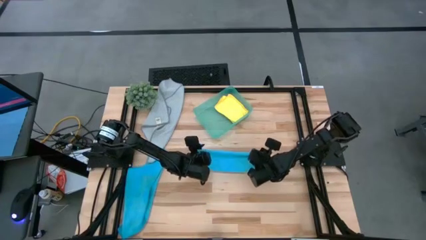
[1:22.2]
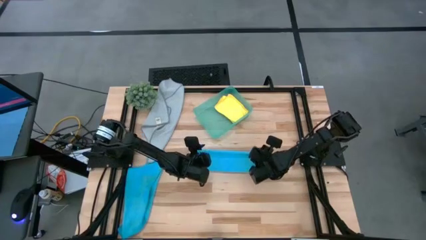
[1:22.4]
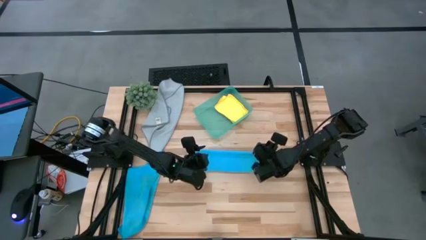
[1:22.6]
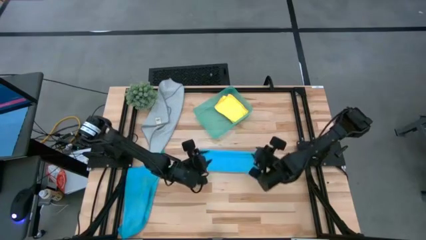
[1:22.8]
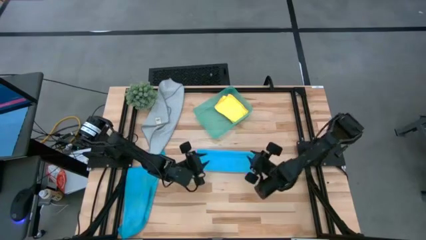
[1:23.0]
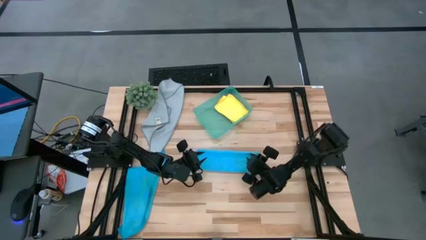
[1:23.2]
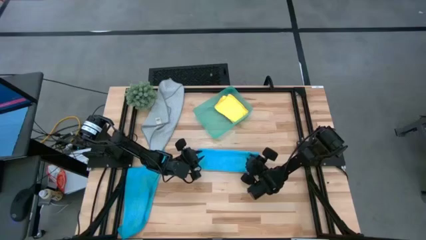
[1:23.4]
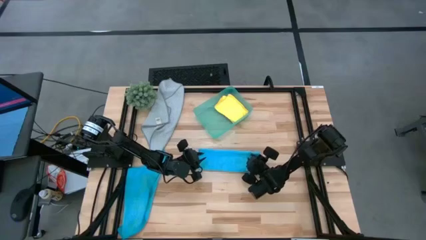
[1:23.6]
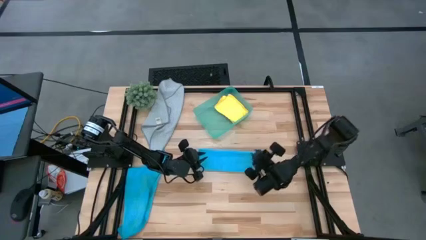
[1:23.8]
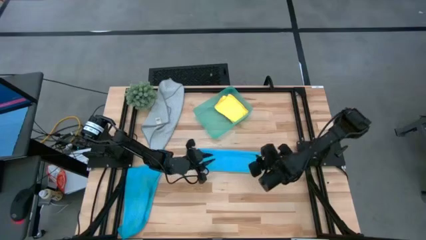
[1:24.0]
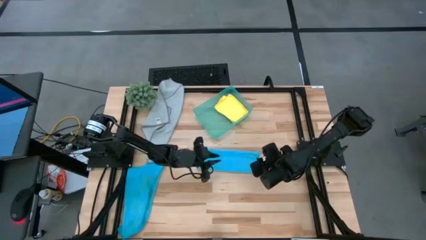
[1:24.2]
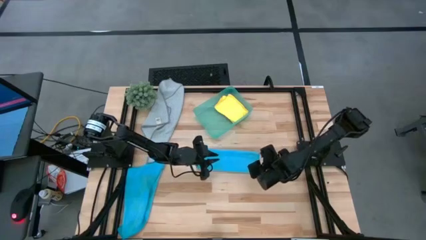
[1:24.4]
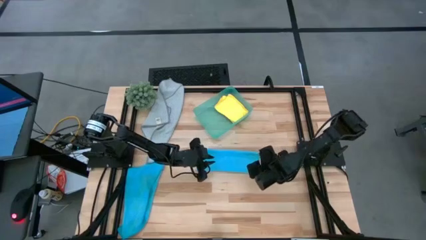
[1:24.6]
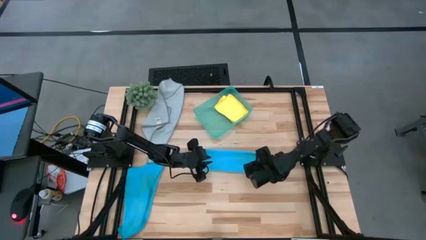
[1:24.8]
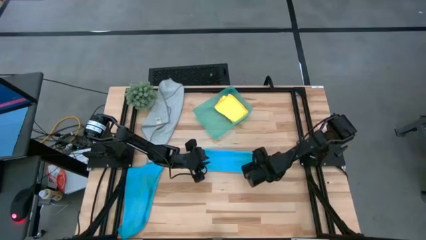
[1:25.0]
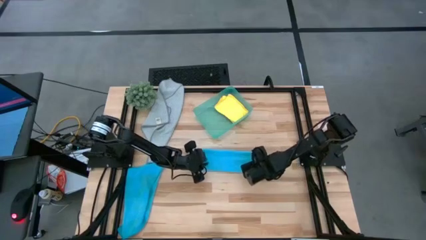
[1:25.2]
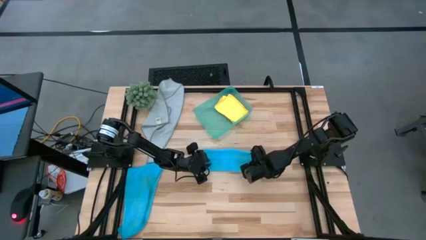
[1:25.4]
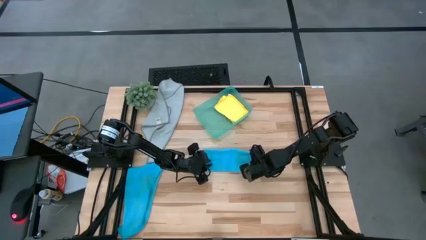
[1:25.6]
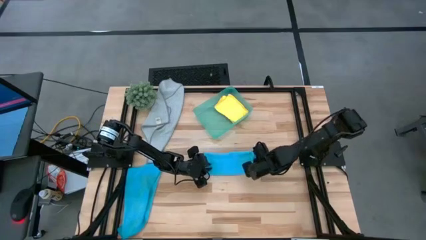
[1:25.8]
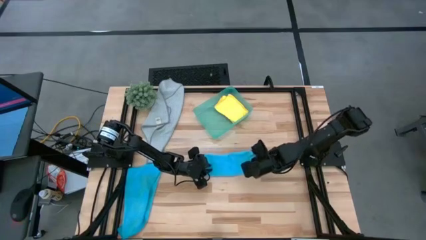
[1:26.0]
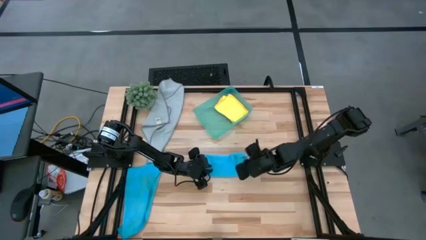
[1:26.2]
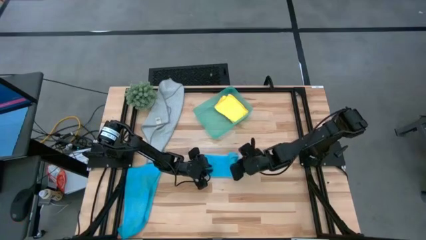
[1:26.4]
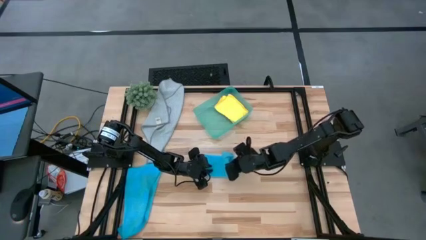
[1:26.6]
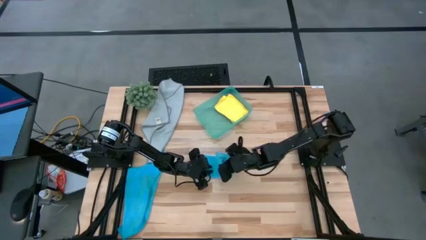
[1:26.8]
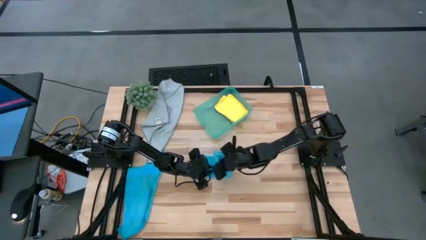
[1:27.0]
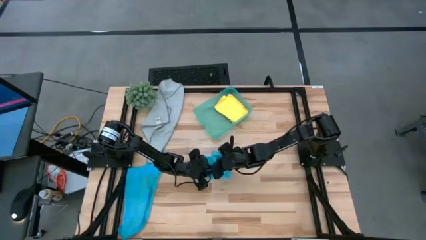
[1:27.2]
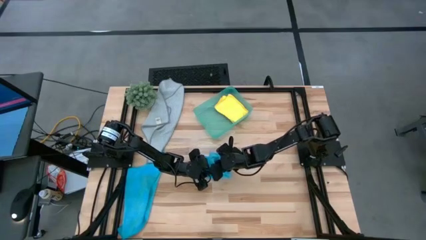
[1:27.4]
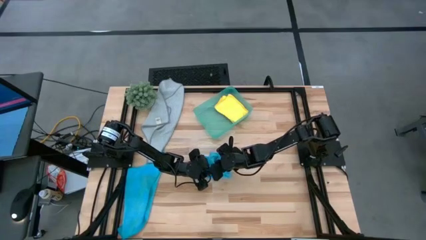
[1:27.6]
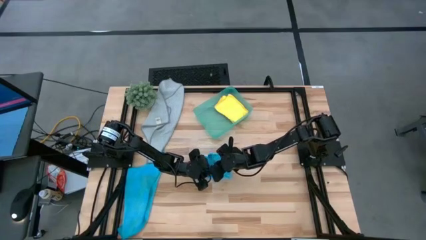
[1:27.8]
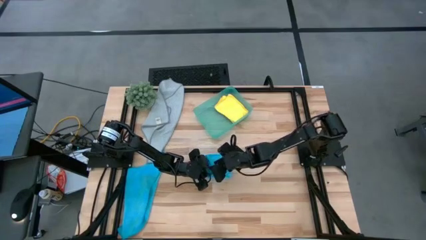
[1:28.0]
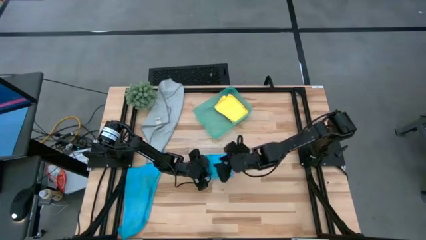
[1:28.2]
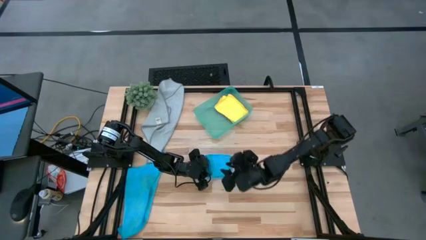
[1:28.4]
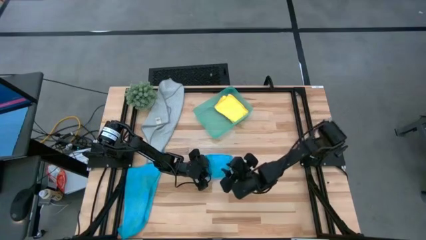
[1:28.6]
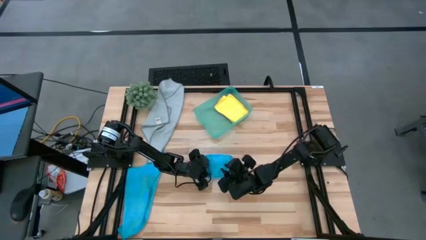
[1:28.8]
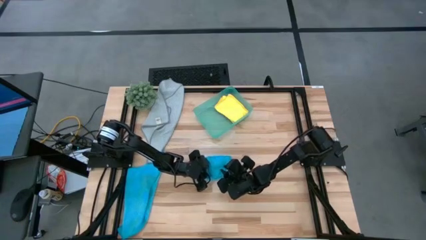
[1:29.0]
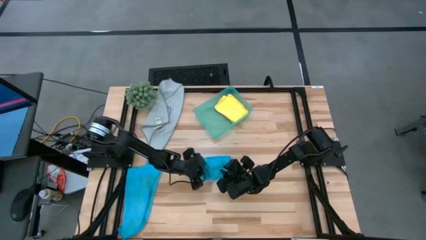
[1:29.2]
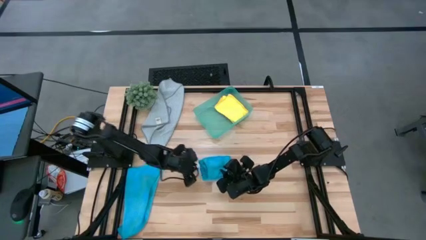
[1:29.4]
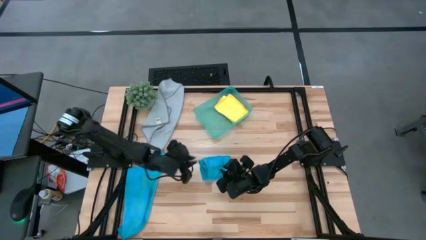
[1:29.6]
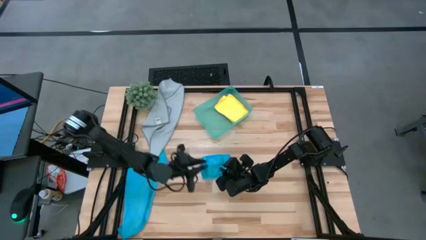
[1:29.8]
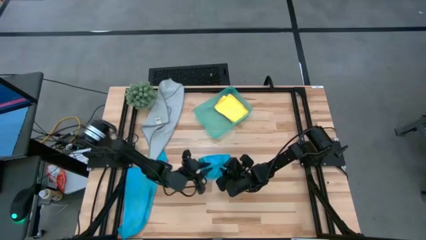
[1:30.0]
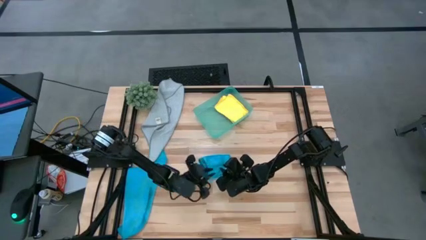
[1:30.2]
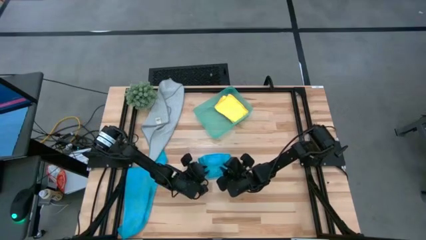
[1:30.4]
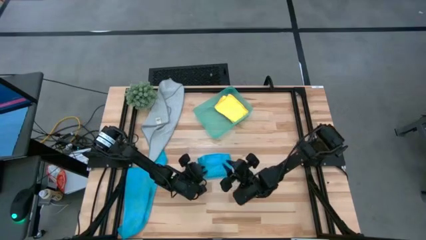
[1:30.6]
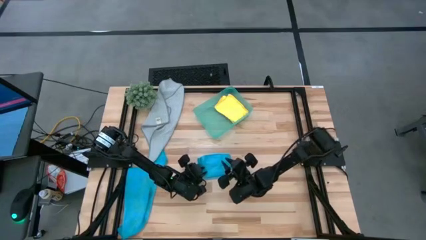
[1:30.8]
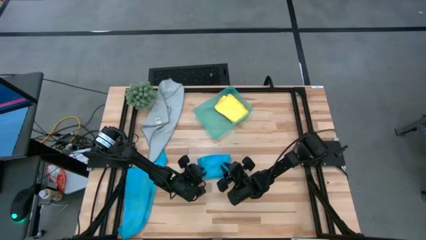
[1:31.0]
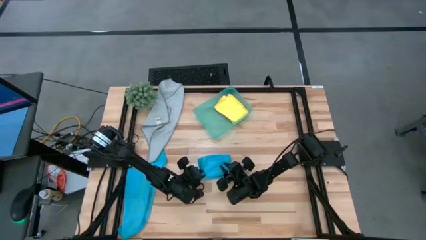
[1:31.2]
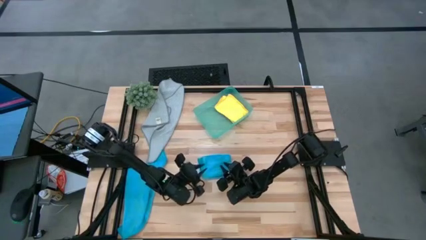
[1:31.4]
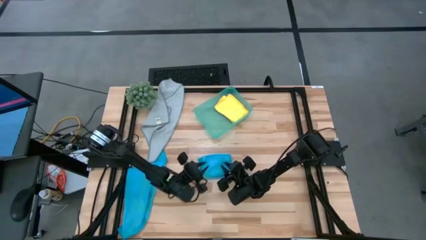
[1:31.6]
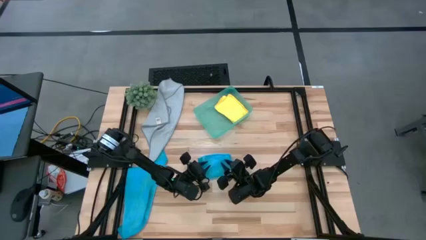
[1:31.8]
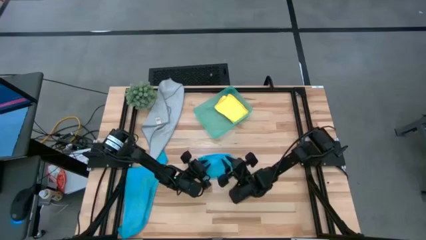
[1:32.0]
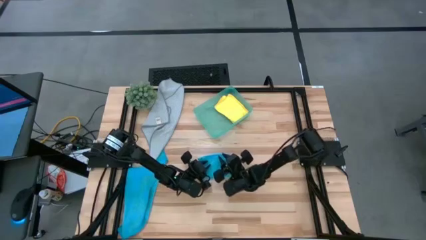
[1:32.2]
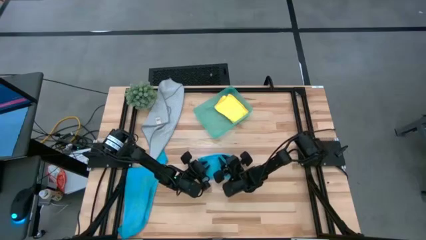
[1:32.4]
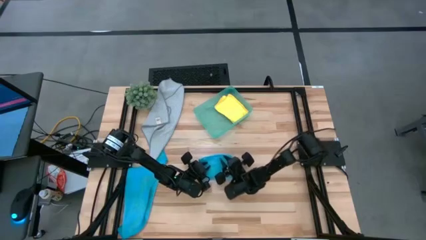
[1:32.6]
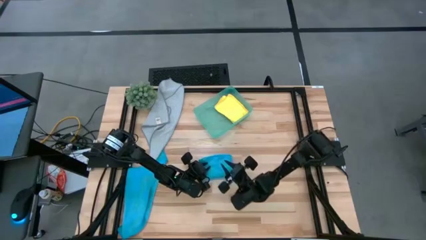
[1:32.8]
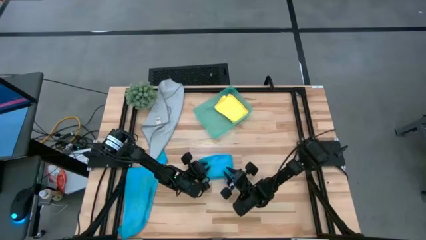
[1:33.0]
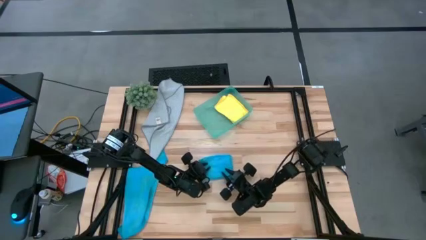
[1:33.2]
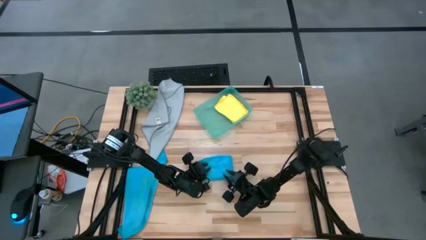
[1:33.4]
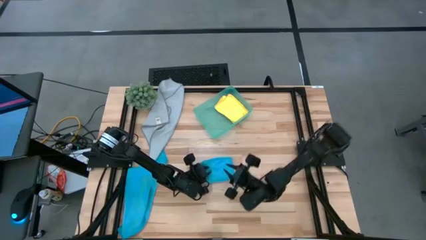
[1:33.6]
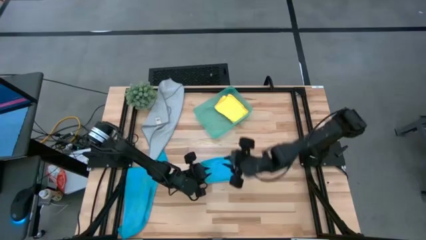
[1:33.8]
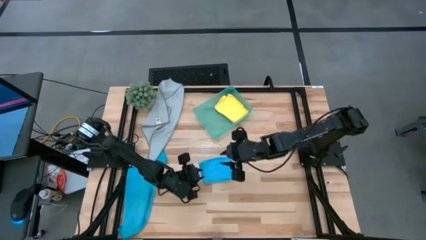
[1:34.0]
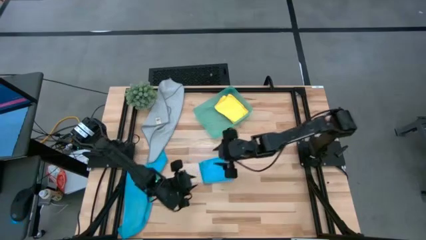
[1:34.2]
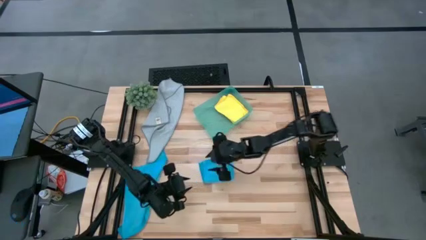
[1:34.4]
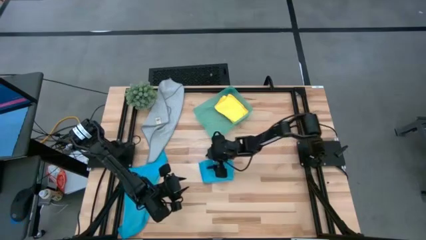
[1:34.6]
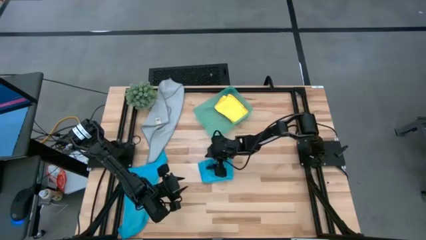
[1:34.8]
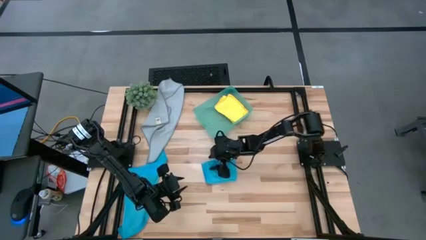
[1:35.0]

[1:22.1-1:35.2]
Task: Fold microfiber towels
Fold the right blue microfiber towel

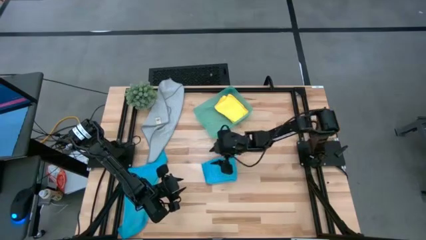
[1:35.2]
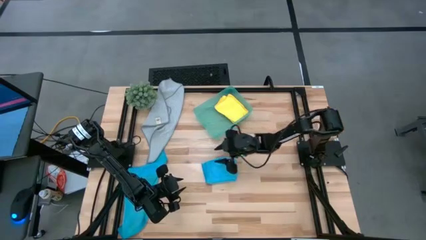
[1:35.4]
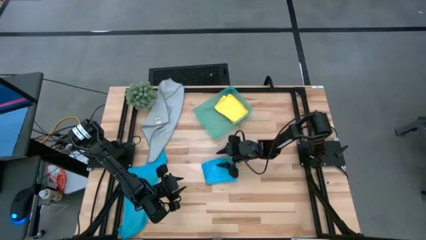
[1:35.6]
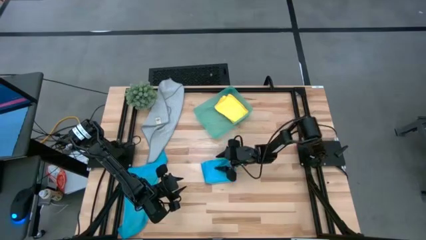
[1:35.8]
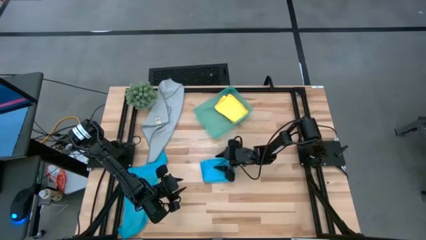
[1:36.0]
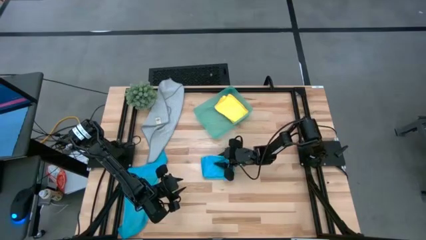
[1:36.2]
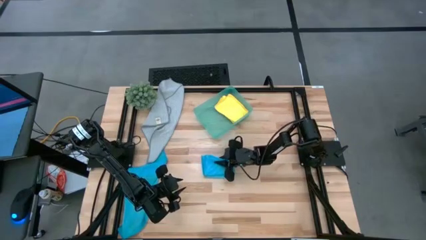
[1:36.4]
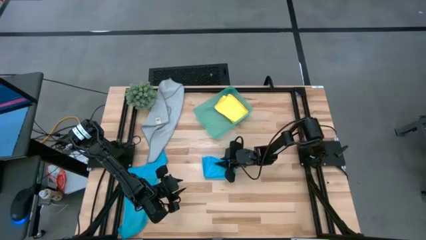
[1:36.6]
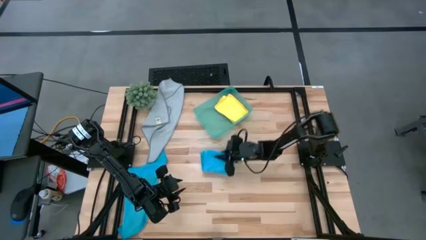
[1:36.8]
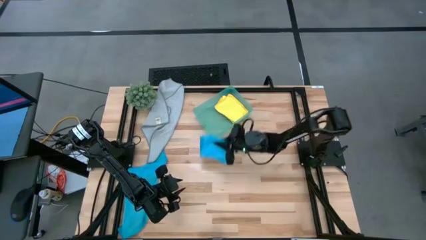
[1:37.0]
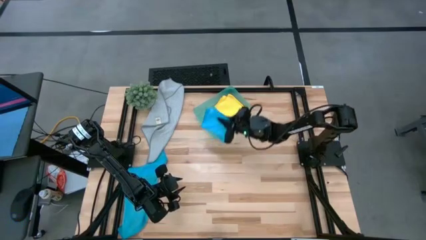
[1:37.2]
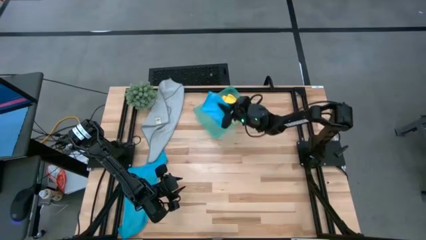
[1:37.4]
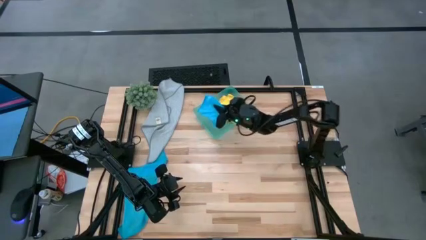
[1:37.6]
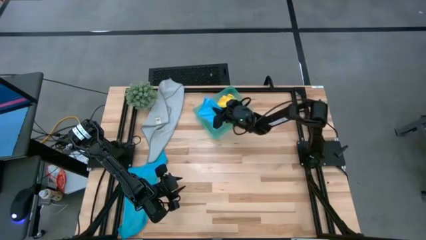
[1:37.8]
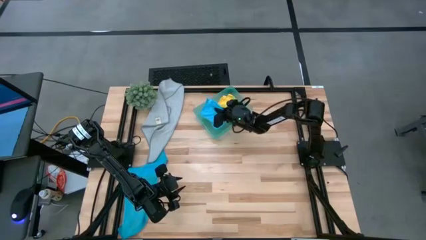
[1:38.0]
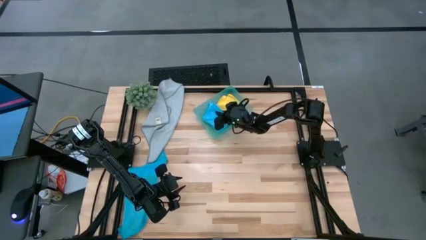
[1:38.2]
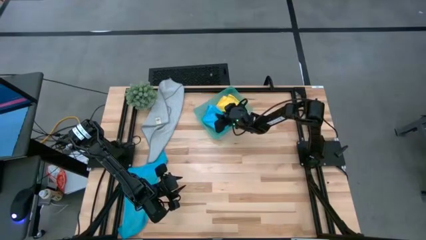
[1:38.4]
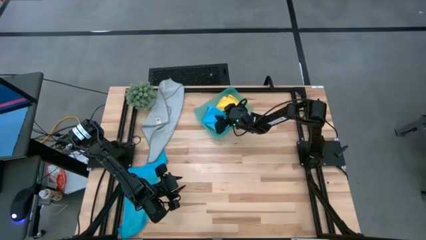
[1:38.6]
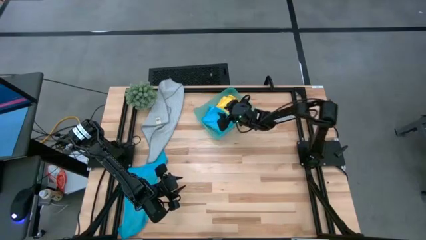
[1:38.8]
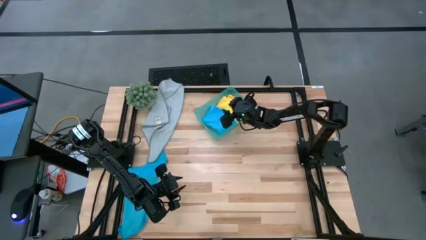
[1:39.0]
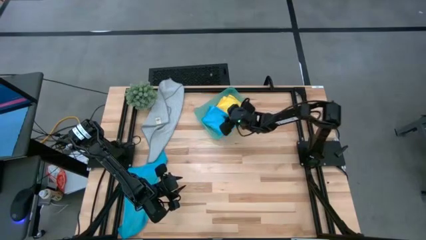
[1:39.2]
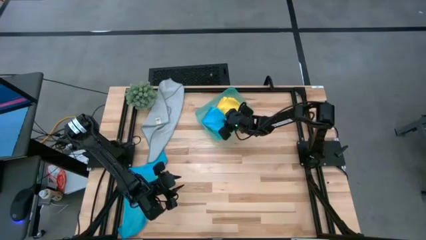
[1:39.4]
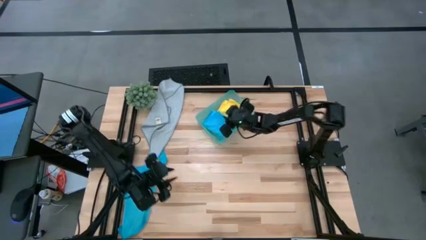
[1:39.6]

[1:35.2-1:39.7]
Put the folded right blue microfiber towel into the green bin
